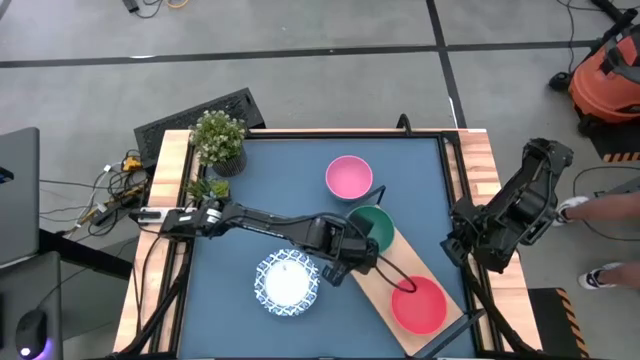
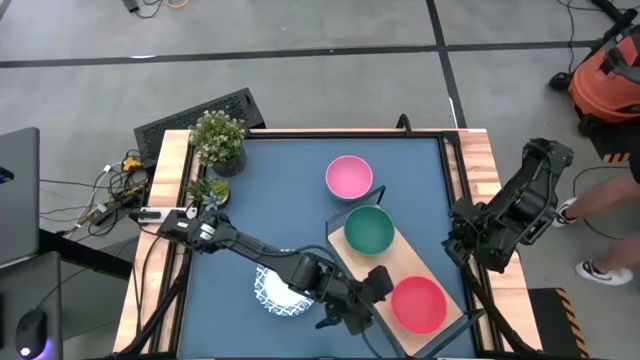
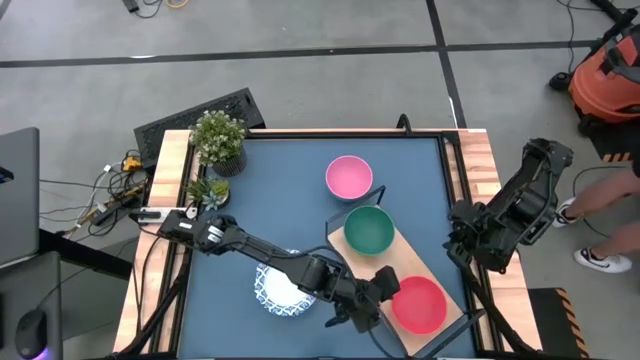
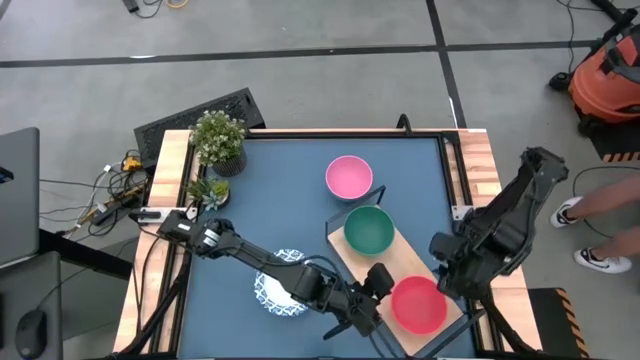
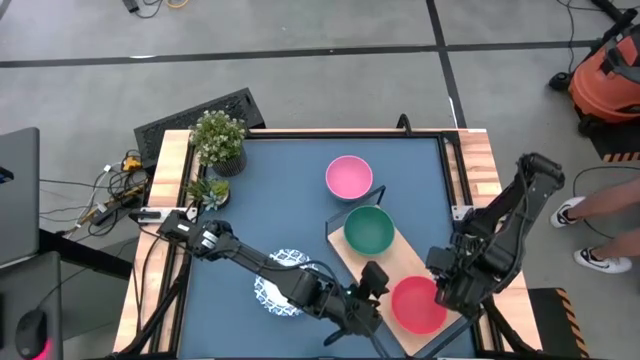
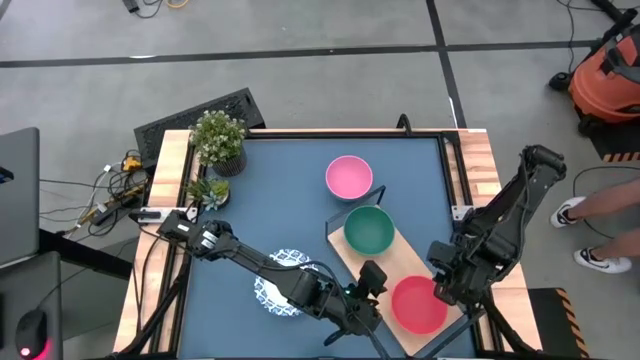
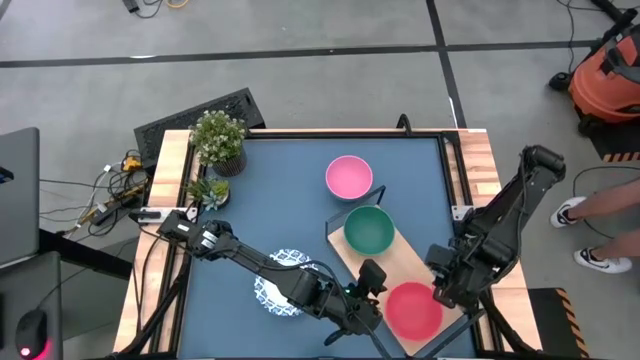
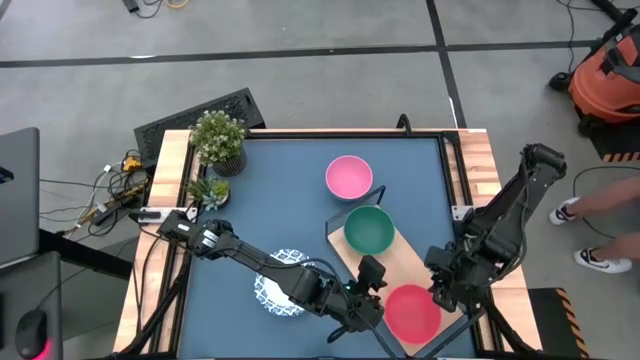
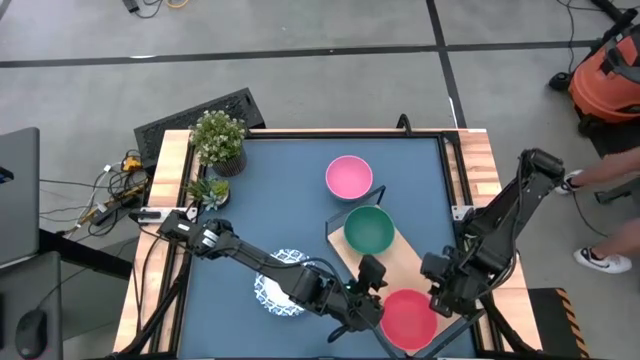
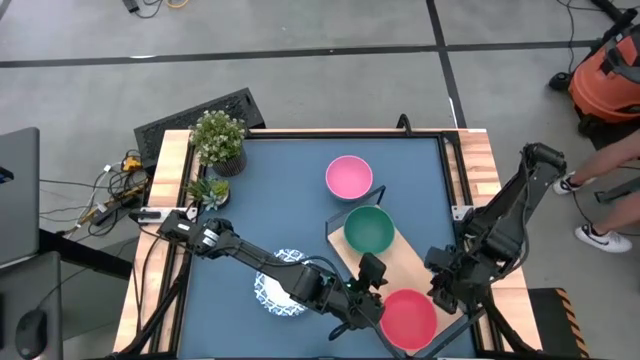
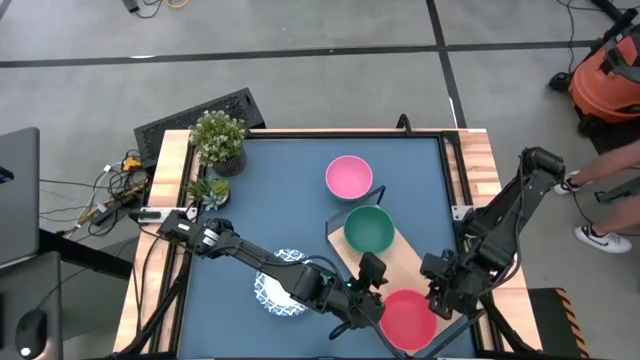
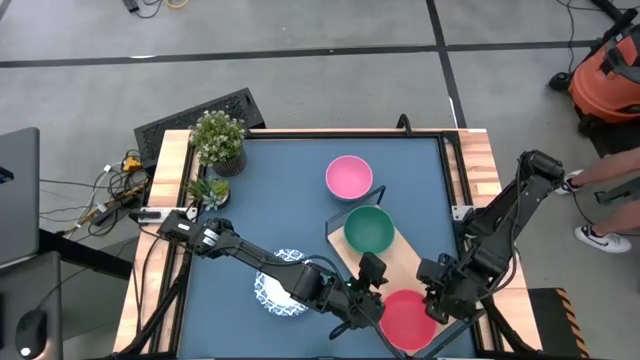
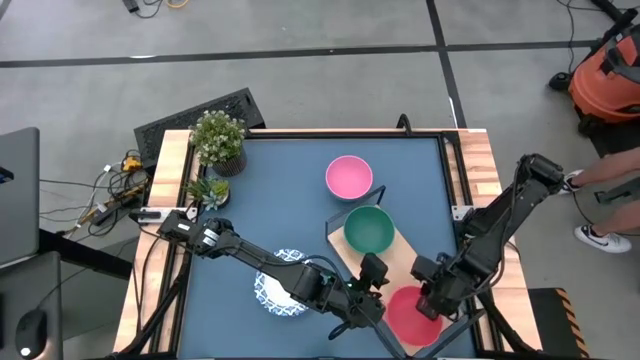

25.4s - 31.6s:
Task: Place and stack bowls onto a shelf
Stack the orange bowl on top of the green bowl on the shelf

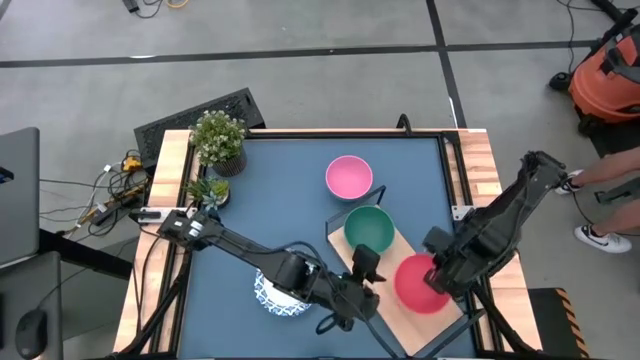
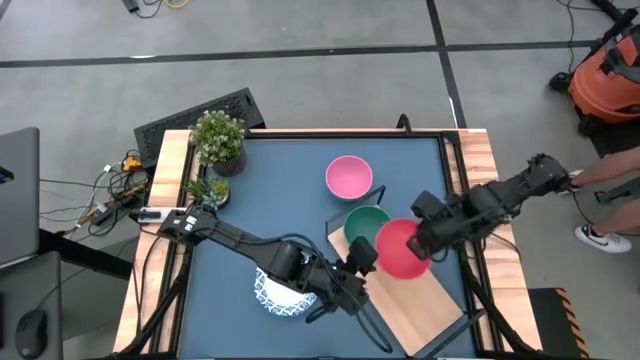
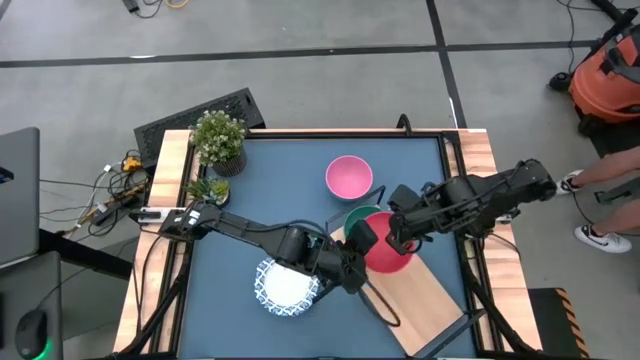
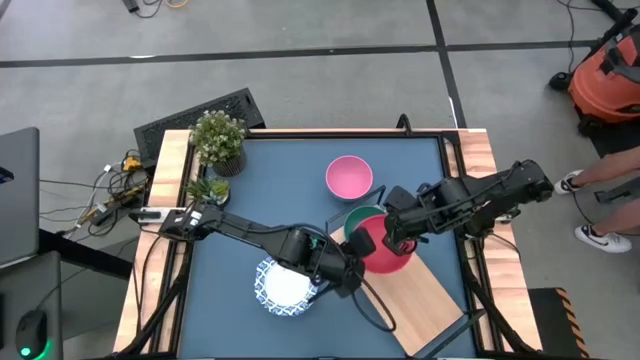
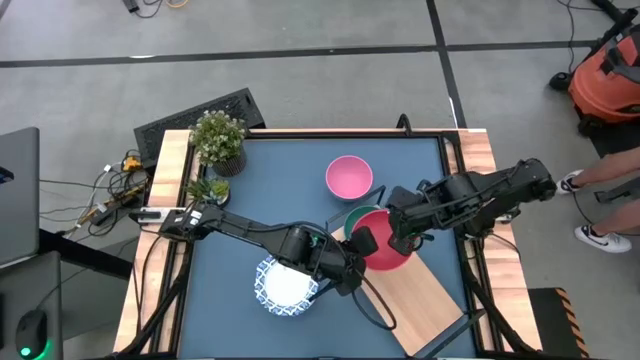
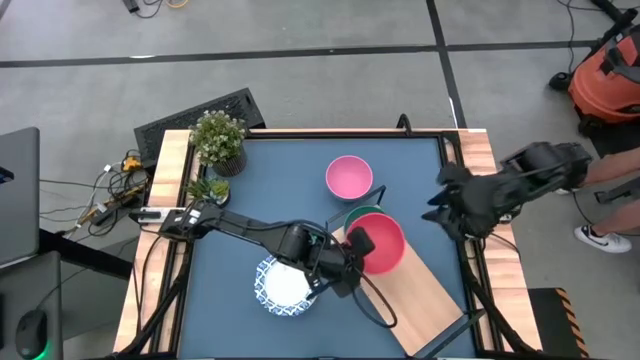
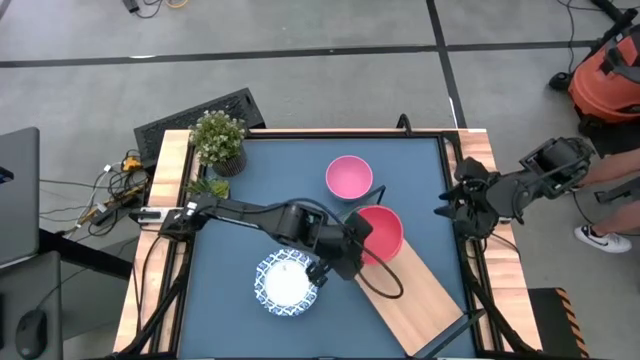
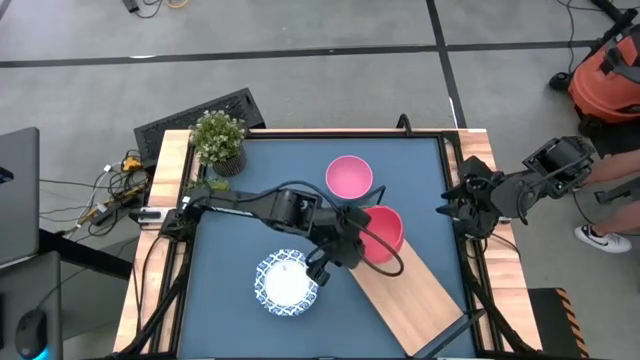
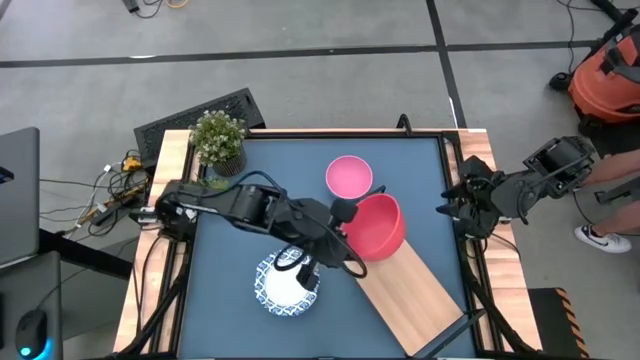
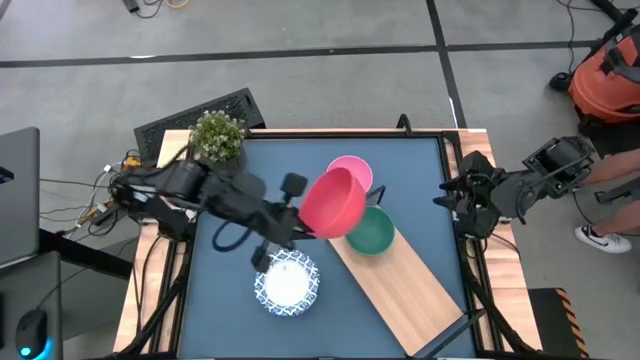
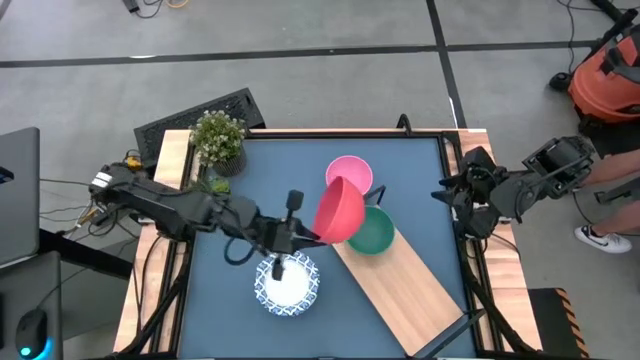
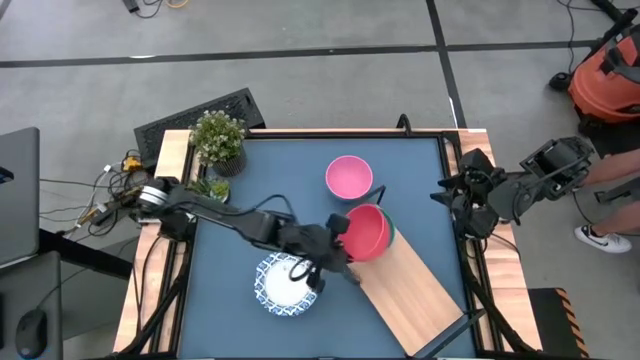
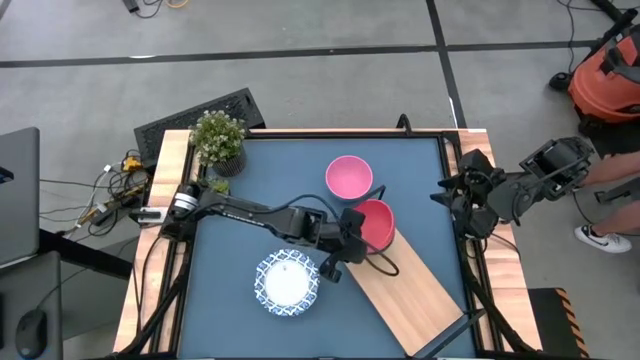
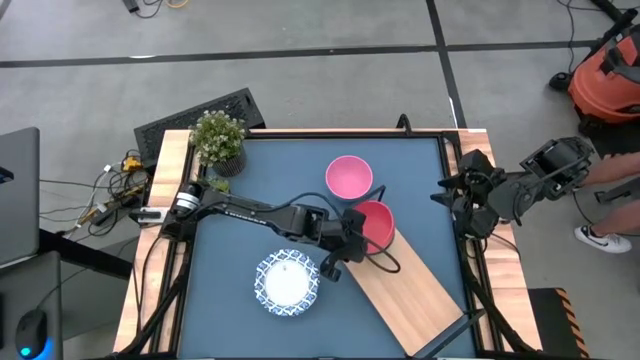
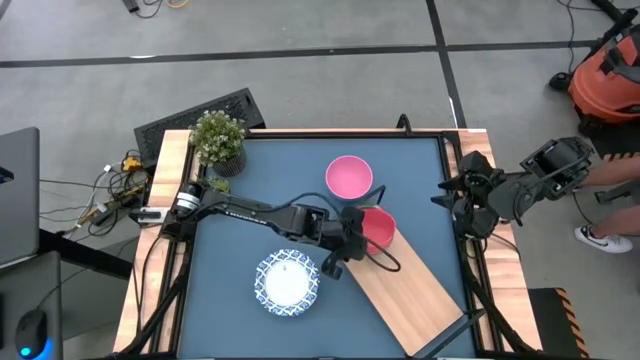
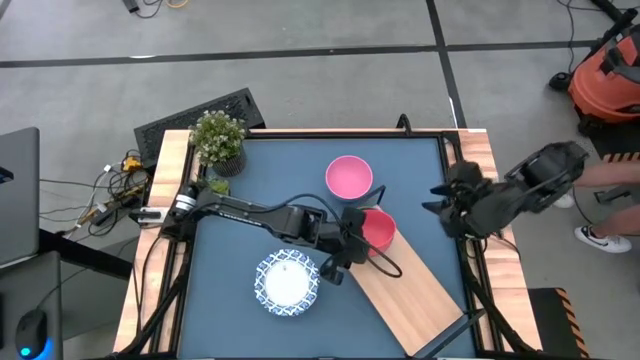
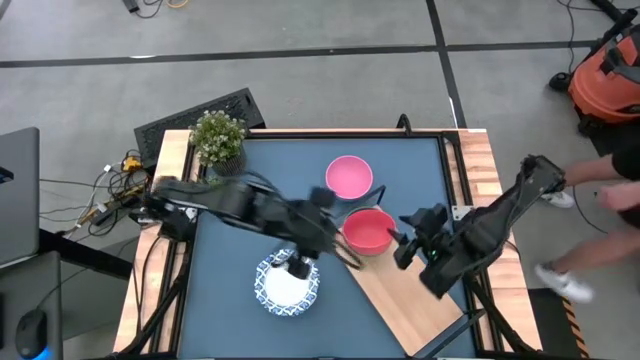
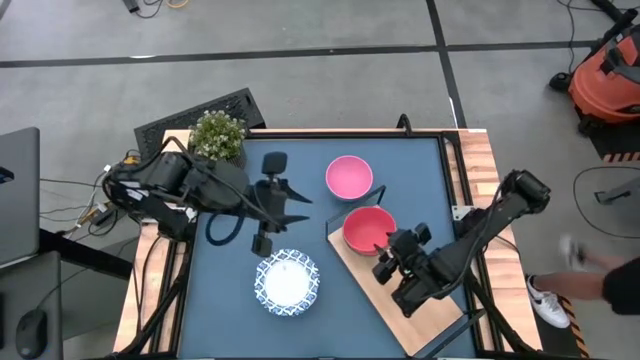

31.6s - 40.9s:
Stack the orange bowl on top of the green bowl on the shelf

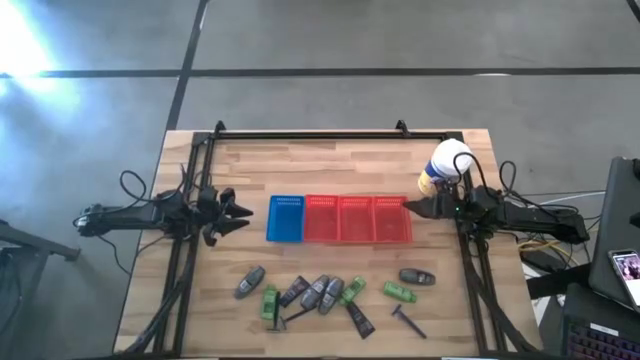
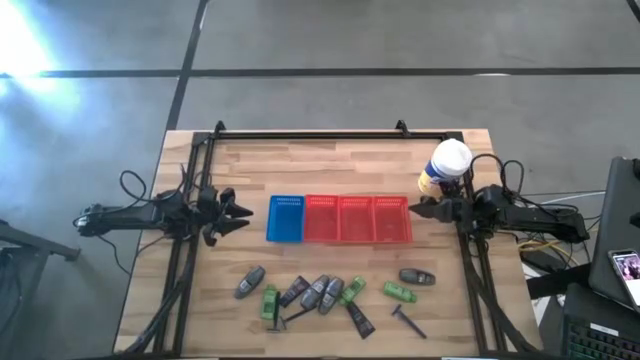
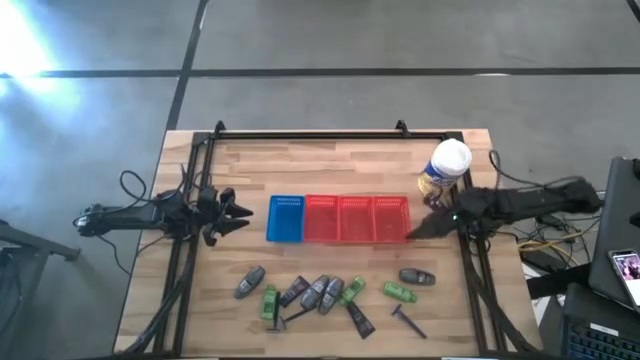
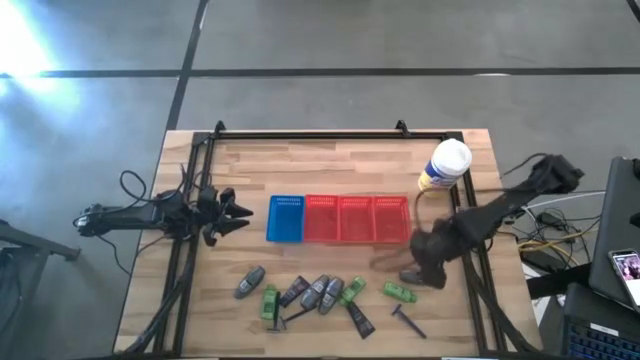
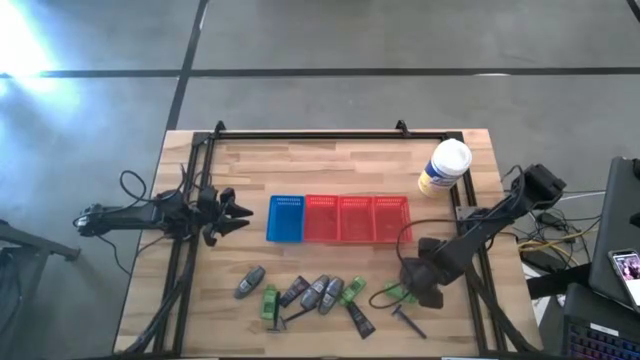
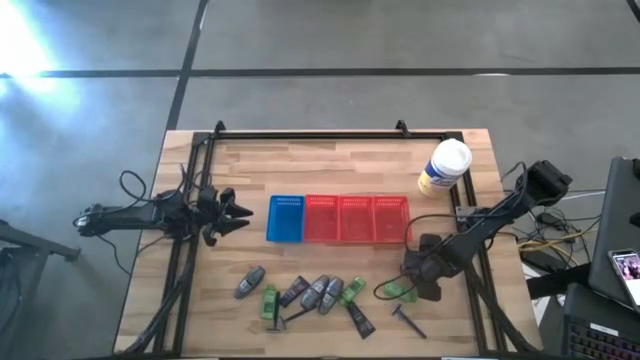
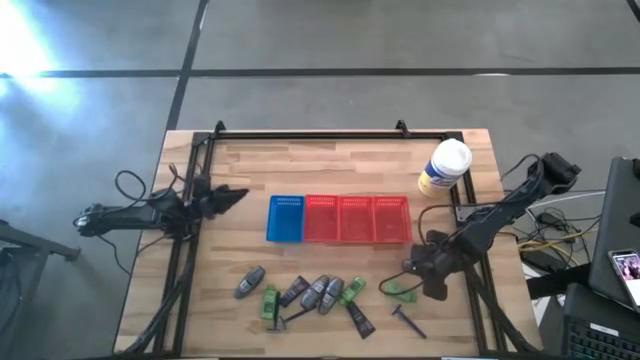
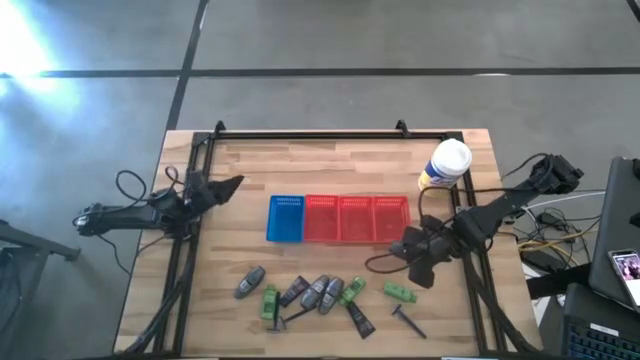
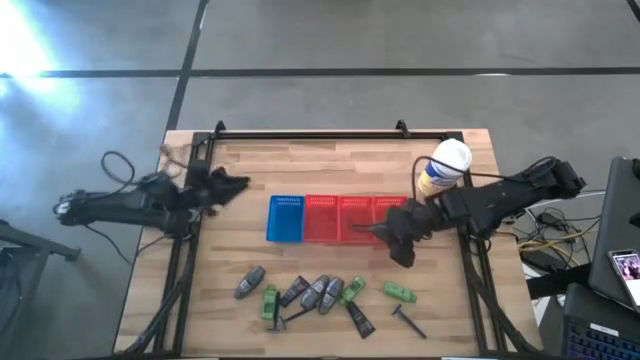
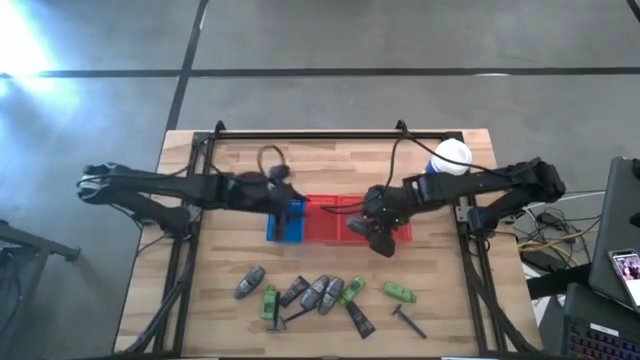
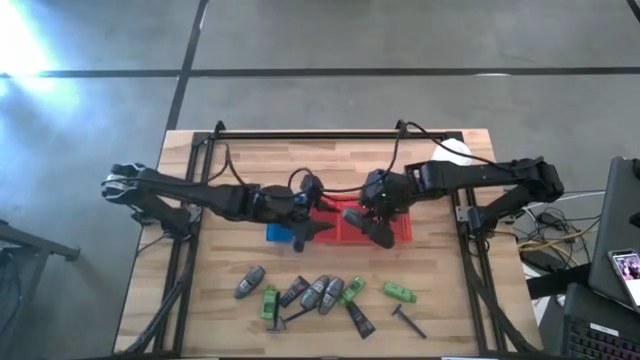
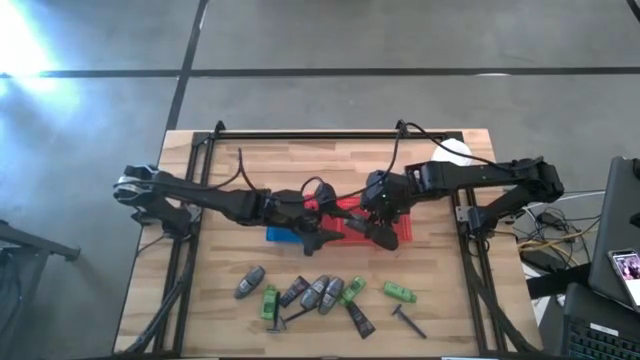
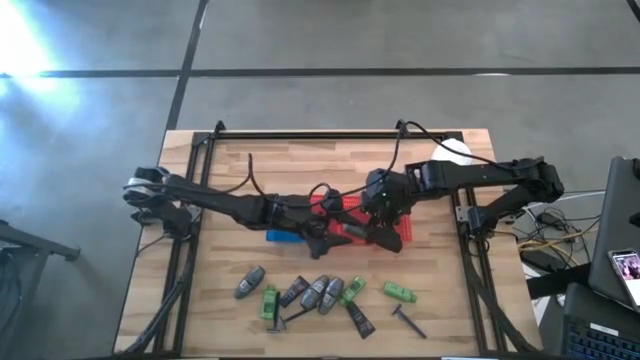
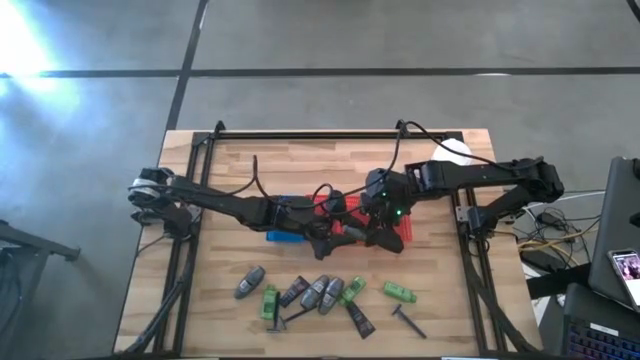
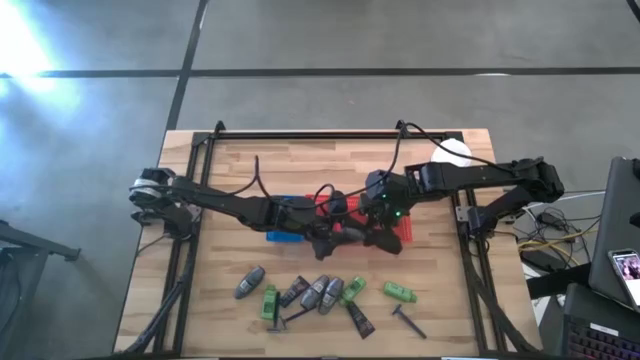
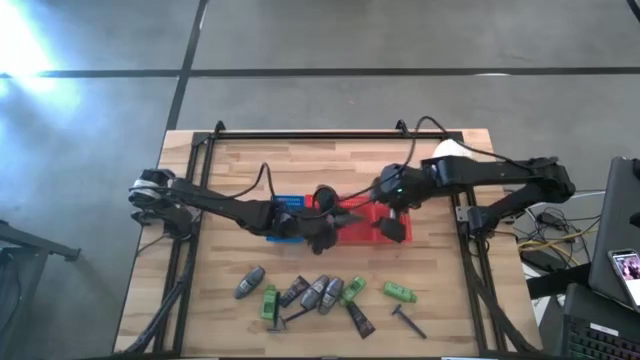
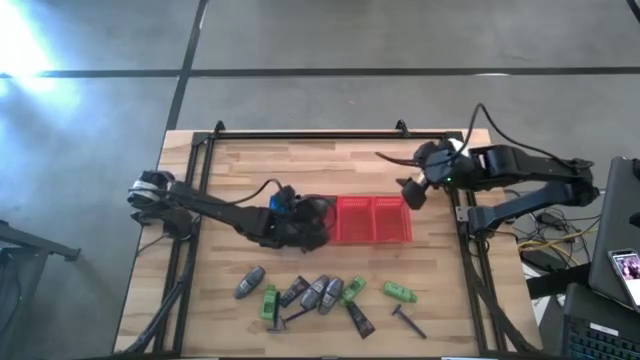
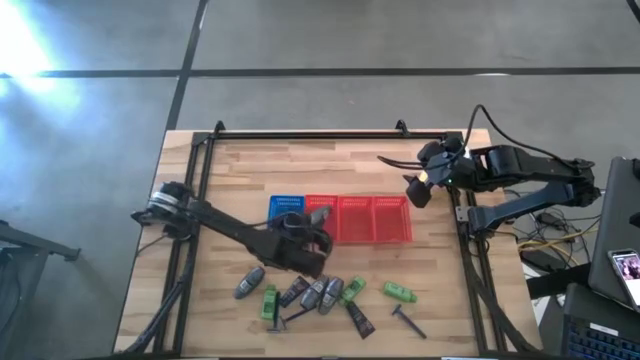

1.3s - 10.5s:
Task: Pick & Place Travel size toiletries
Put the black deodorant into the left red bin
